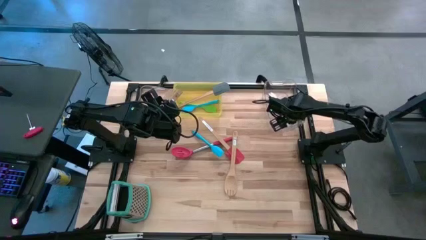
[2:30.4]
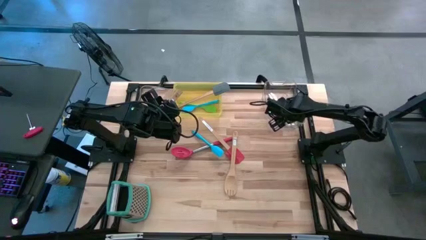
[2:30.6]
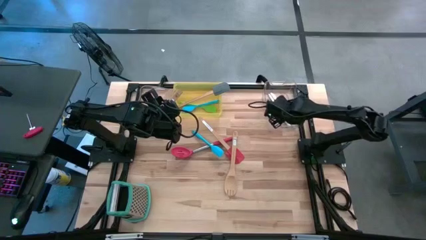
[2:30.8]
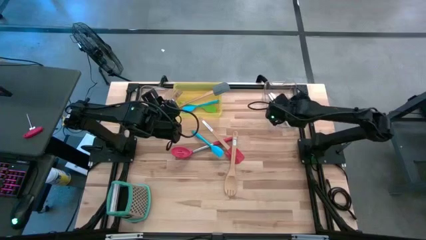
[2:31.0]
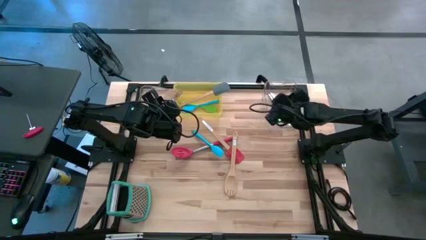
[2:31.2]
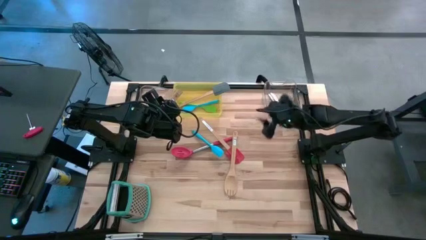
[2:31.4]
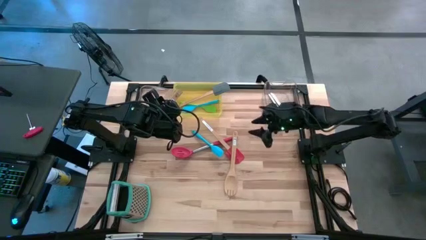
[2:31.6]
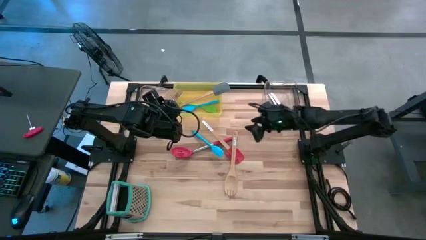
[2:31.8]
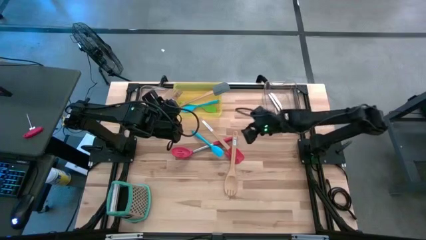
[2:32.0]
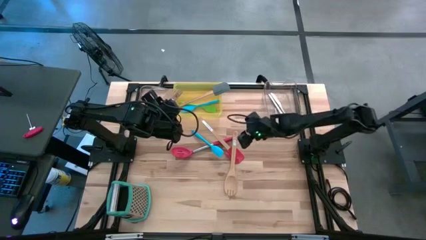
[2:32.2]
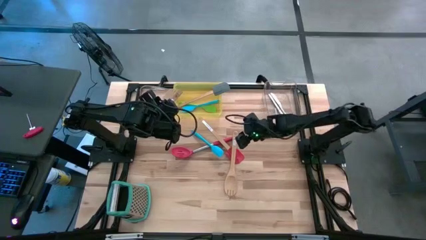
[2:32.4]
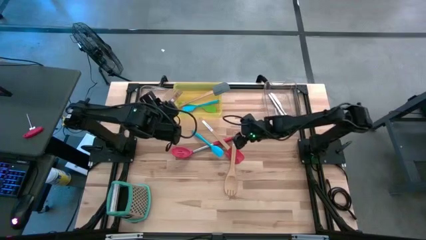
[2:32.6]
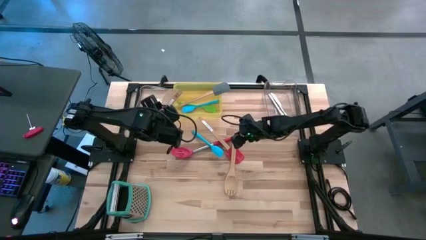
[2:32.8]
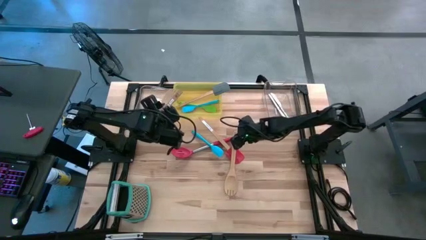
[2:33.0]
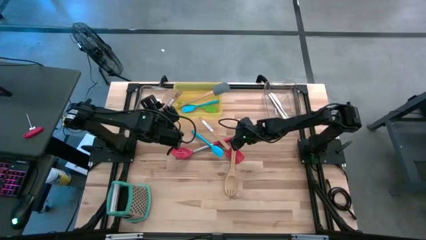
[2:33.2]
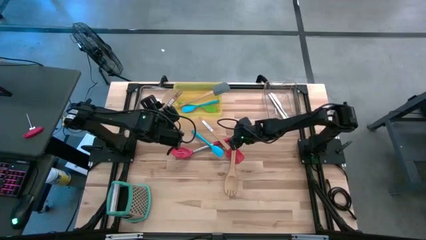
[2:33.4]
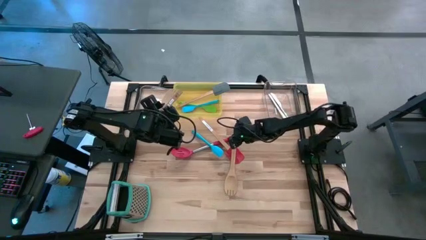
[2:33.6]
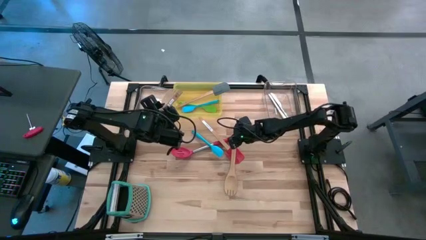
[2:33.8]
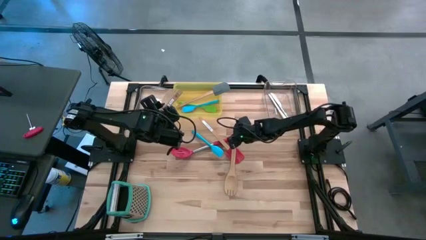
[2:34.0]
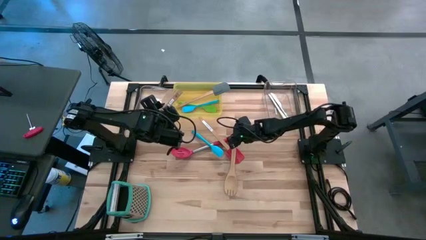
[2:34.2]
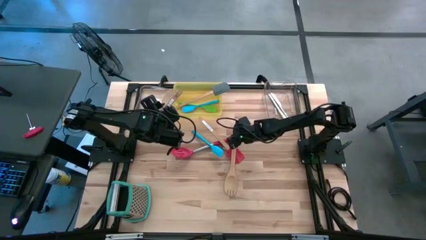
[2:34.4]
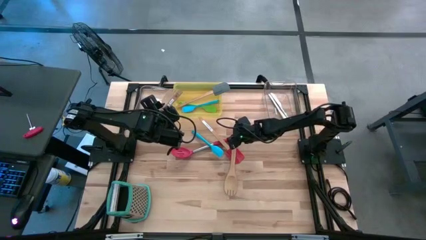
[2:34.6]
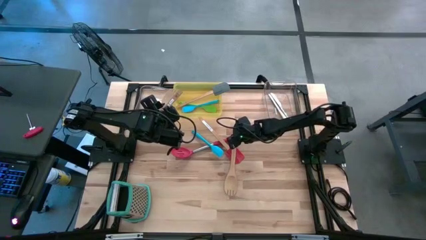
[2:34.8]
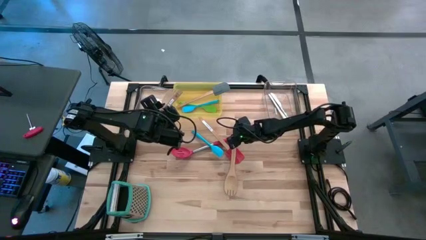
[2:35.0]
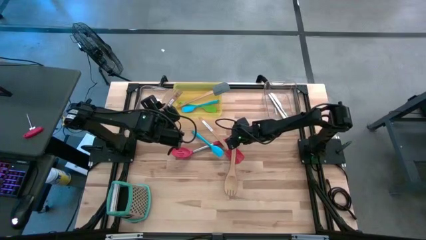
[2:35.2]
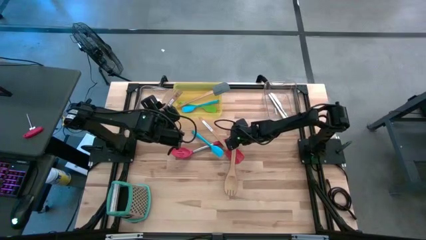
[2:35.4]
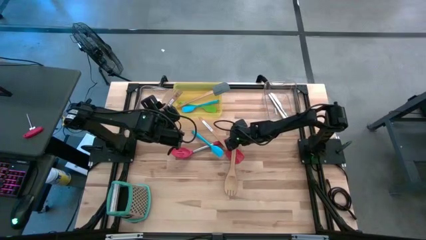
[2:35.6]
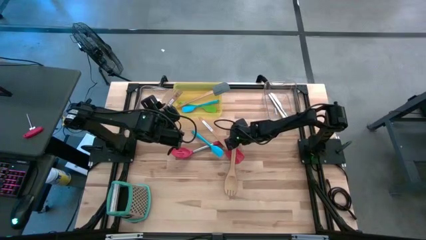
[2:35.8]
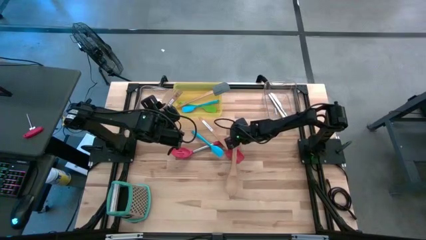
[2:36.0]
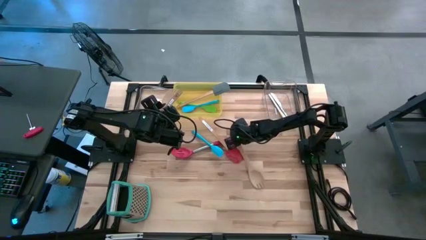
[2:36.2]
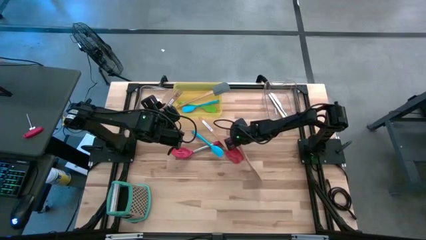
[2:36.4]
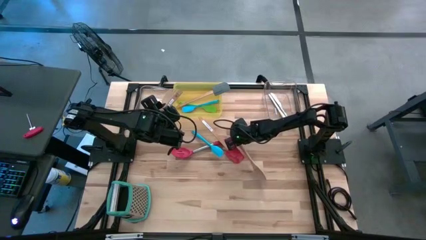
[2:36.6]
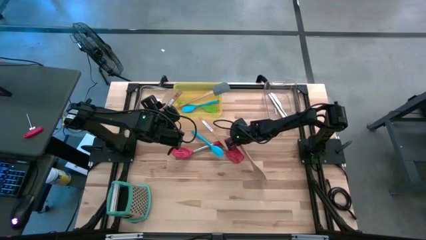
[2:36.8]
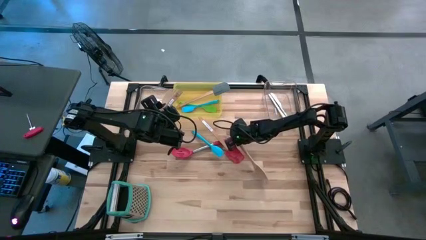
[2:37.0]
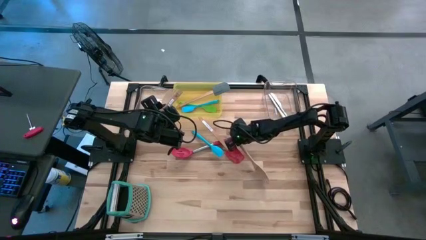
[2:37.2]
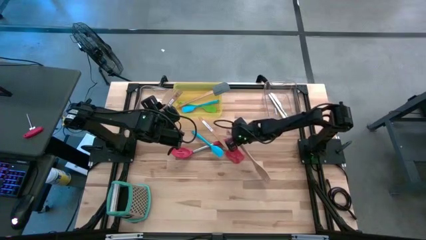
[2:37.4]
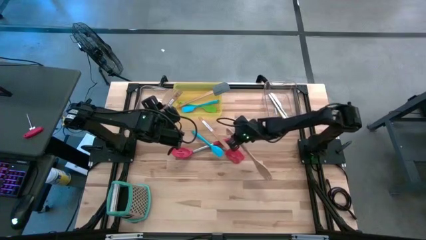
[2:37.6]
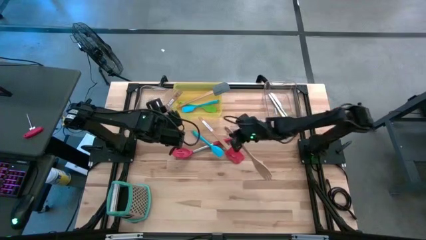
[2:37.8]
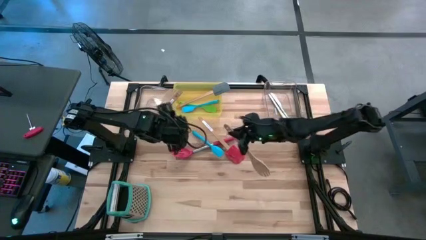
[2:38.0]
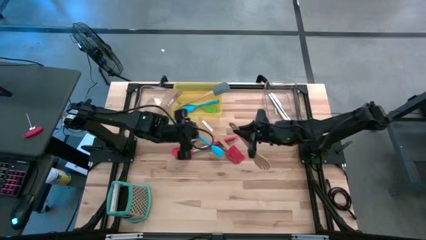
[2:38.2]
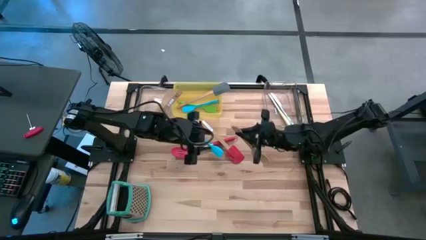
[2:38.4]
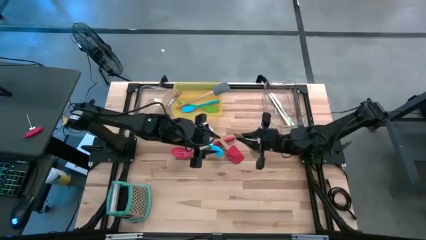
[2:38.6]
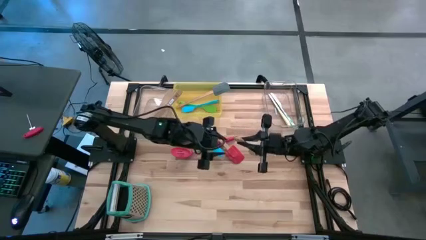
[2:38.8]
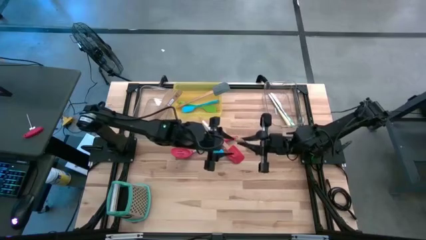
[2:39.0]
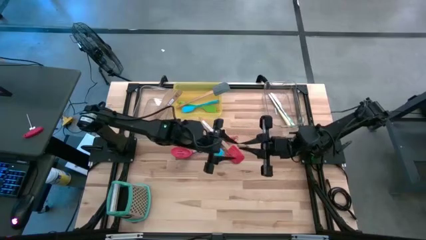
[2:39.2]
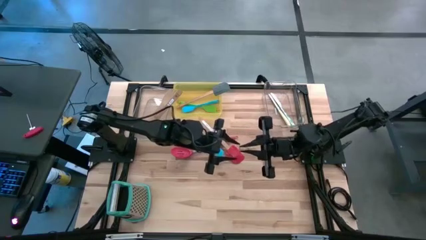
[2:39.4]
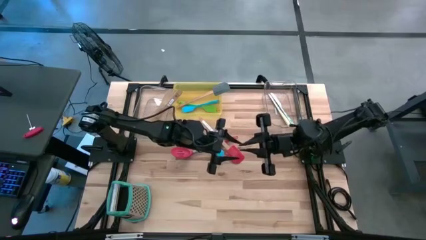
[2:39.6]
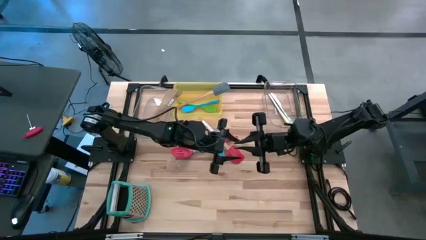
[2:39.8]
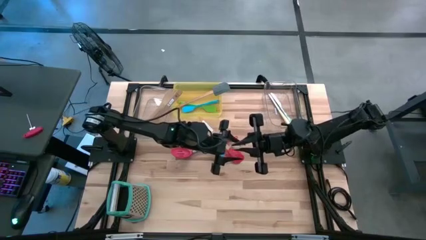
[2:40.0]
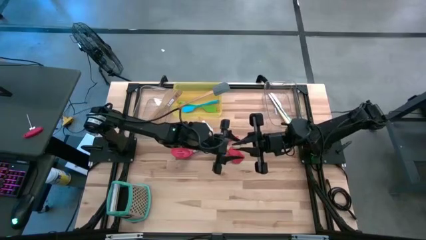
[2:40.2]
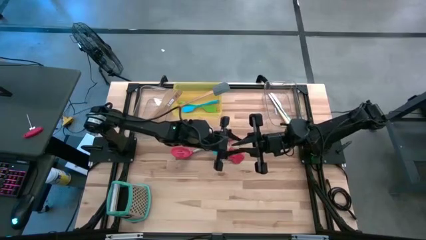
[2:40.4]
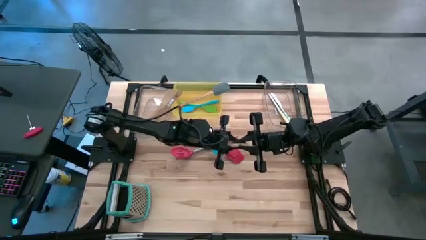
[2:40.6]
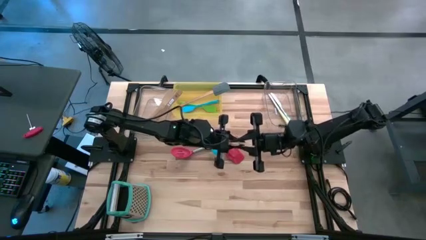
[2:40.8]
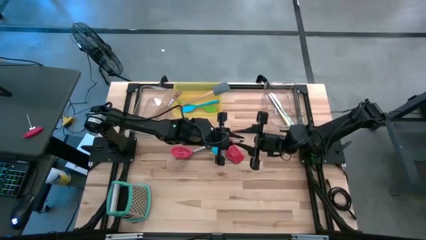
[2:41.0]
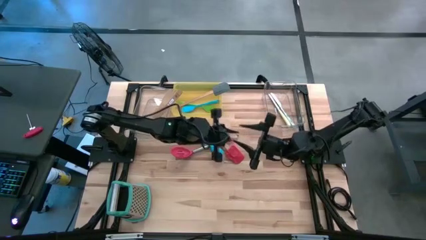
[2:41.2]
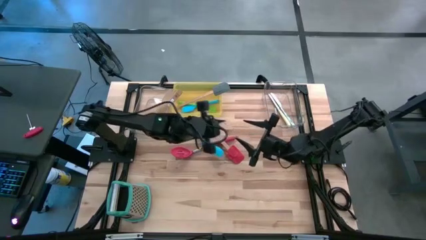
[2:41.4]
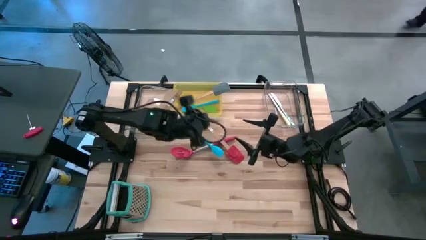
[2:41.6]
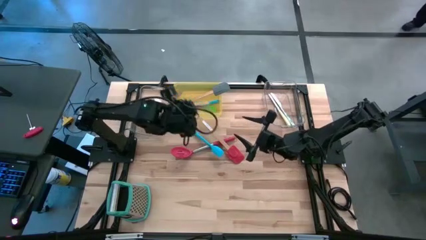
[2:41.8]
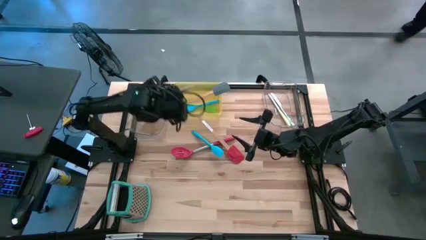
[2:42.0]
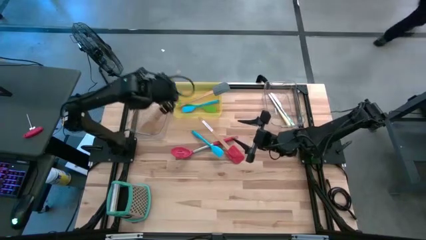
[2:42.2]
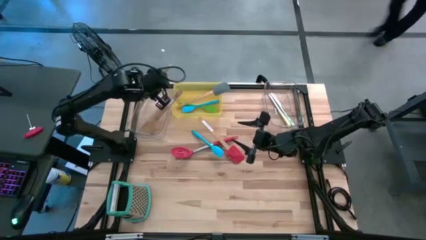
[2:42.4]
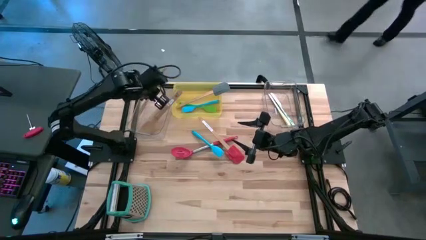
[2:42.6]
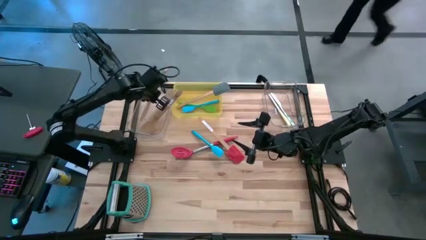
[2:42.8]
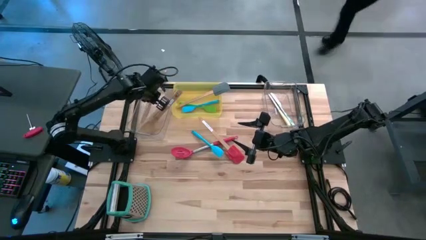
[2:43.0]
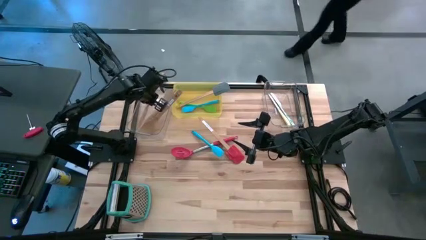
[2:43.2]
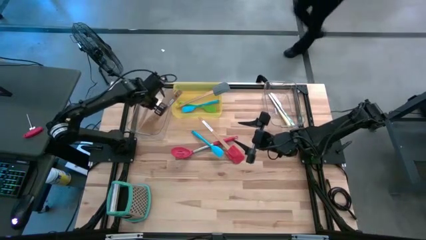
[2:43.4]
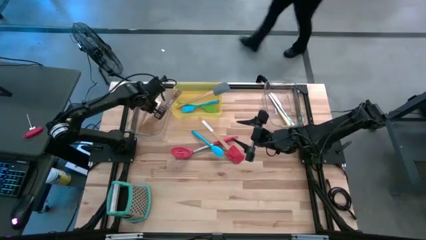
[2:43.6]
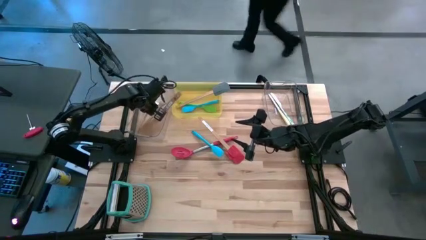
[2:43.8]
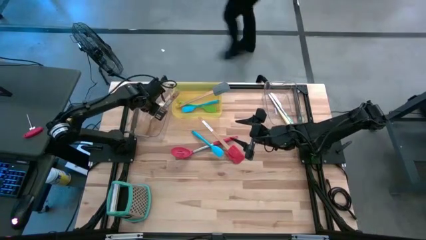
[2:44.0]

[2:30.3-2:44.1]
Task: Pick & Place Kitchen Items
Put the wooden serving spoon into the left transparent bin

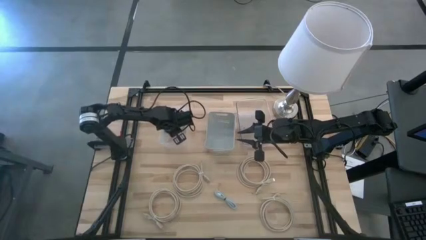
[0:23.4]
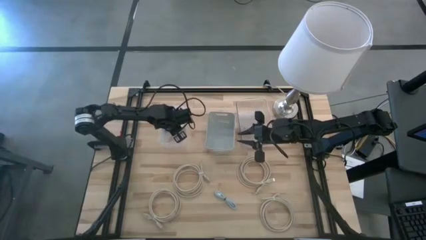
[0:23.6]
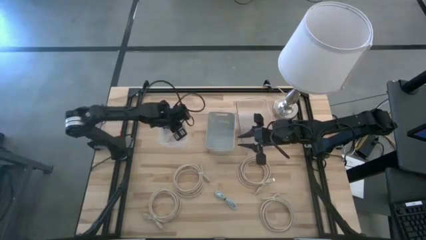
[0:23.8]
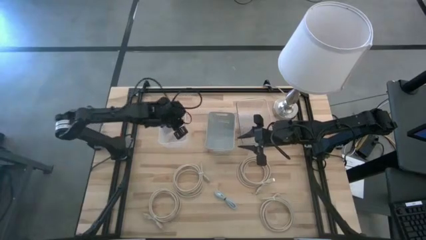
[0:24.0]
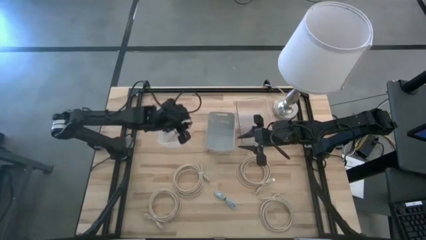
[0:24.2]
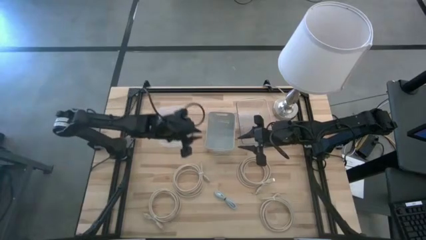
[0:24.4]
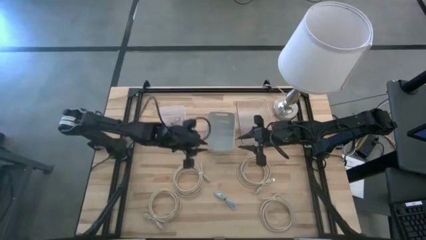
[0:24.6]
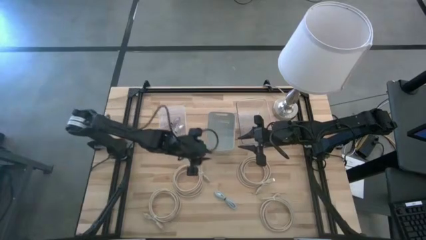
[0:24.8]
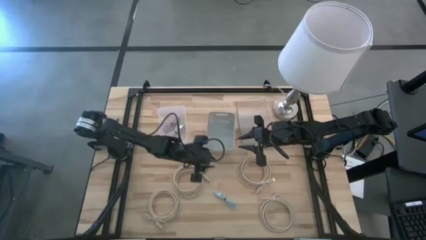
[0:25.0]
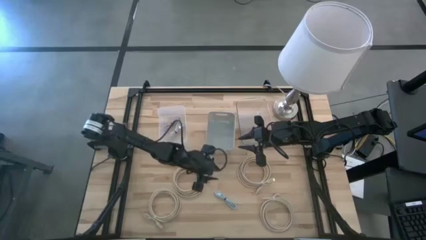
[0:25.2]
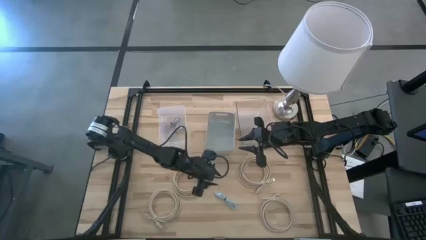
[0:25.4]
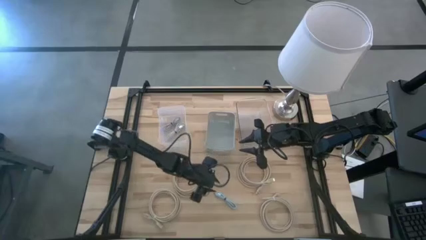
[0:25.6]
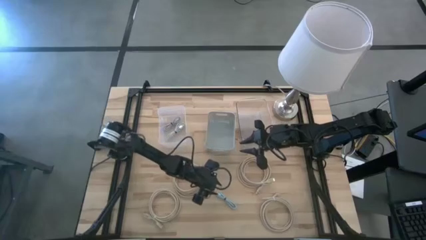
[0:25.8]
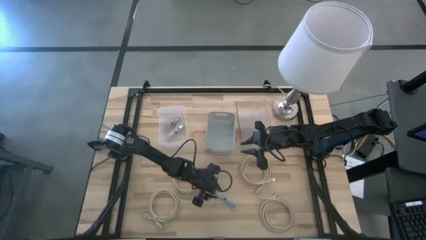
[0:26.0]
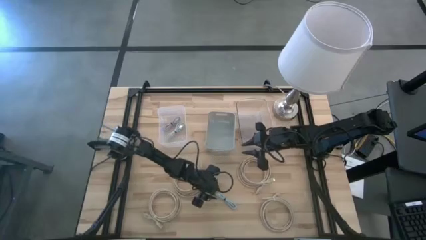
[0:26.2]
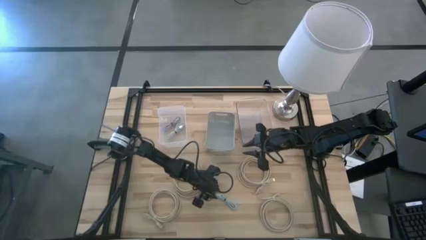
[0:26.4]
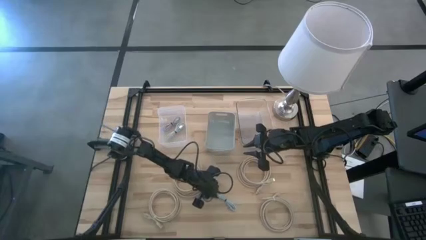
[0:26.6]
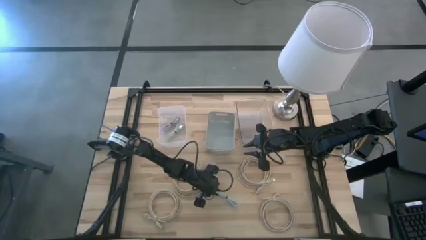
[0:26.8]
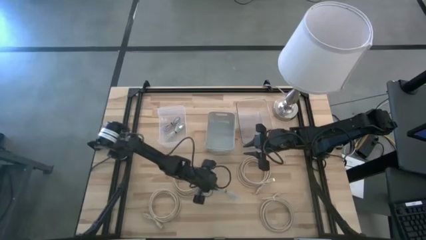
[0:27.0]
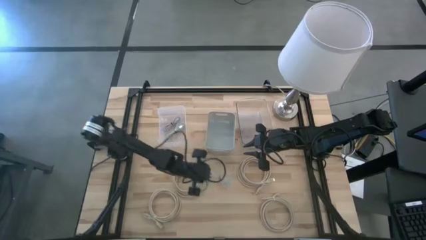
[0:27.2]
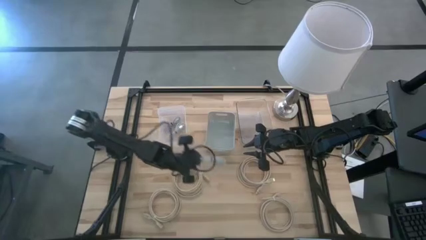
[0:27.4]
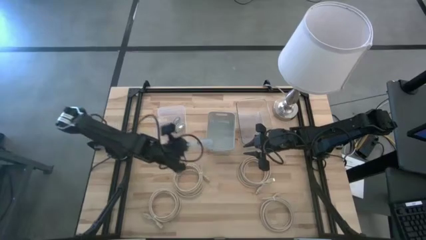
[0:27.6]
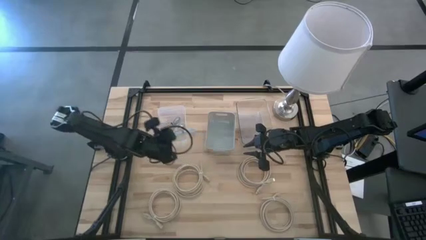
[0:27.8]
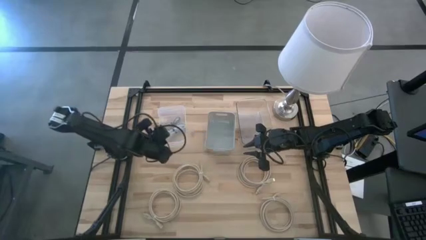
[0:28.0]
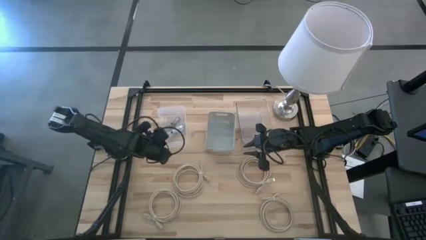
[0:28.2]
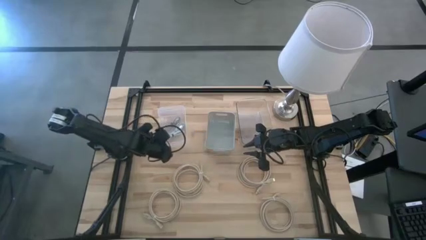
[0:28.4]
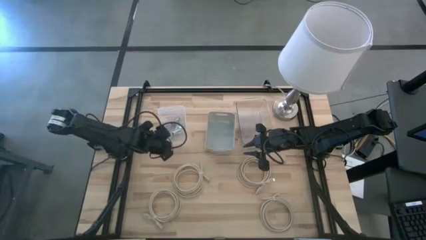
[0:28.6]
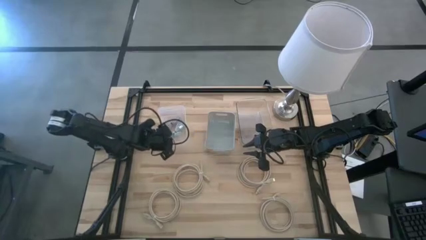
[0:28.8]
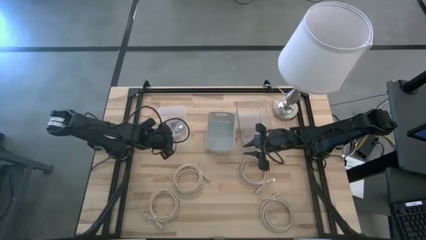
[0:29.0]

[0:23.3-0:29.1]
Task: Pick & Place USB Port
Put the blue charger cable into the left transparent bin
